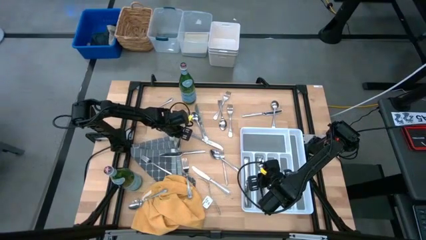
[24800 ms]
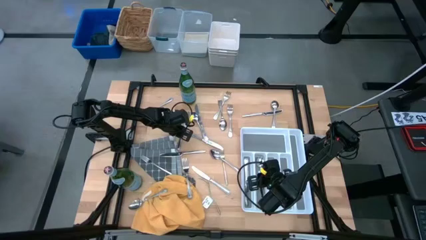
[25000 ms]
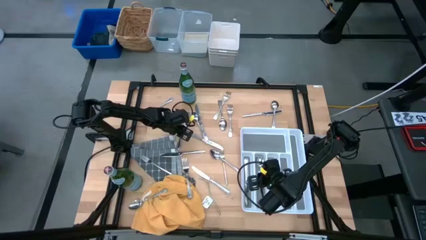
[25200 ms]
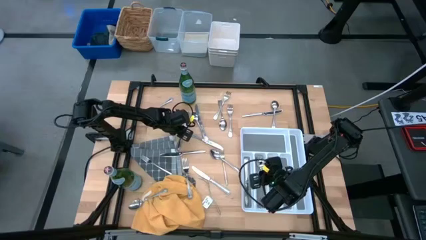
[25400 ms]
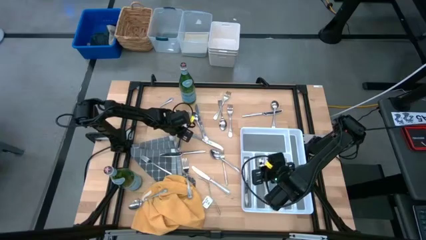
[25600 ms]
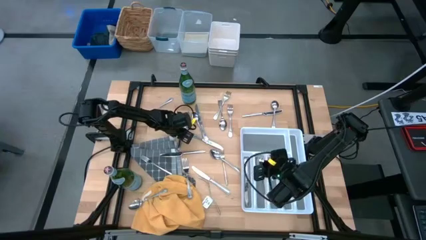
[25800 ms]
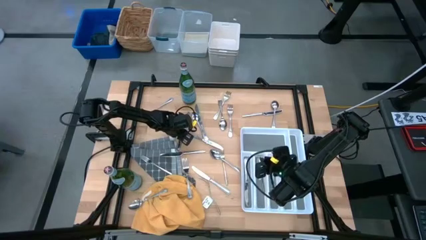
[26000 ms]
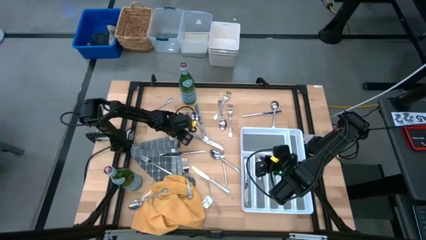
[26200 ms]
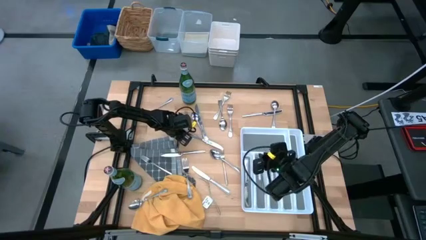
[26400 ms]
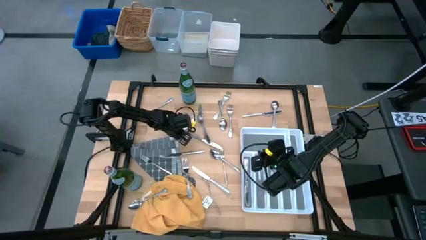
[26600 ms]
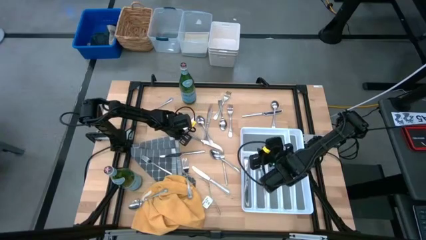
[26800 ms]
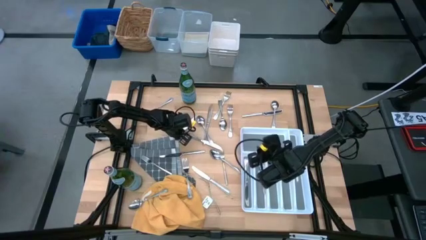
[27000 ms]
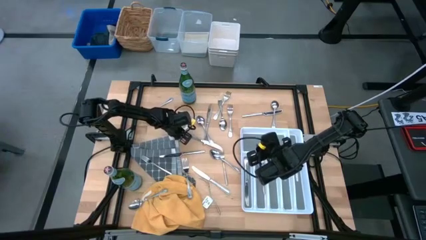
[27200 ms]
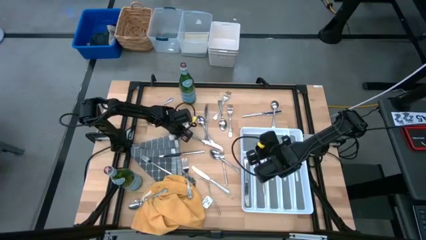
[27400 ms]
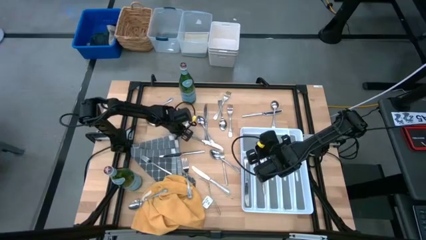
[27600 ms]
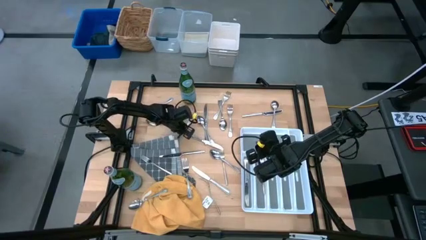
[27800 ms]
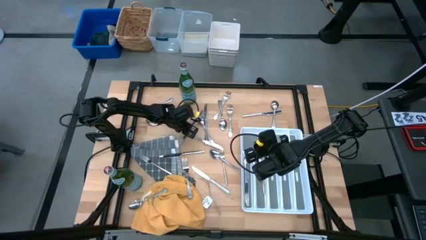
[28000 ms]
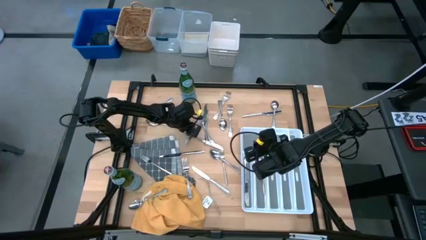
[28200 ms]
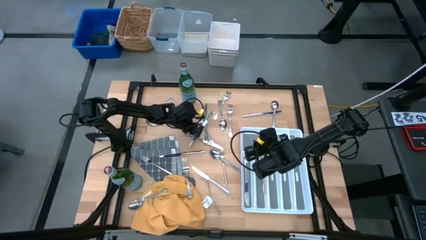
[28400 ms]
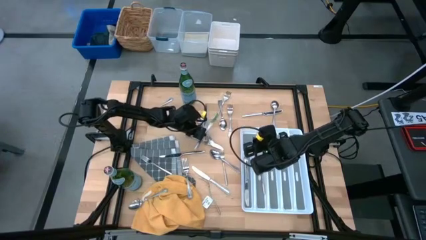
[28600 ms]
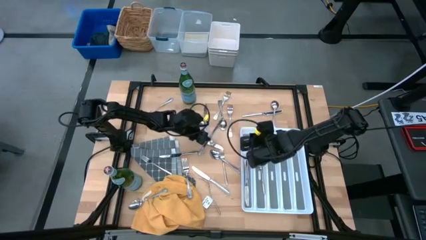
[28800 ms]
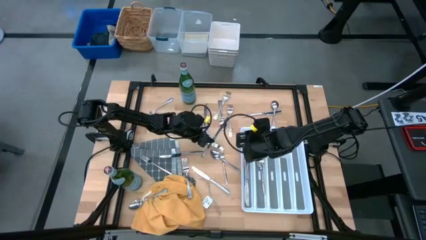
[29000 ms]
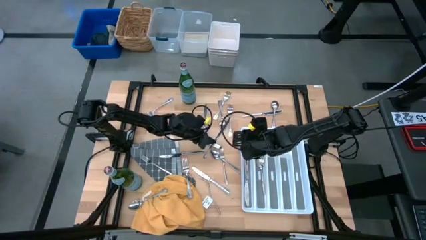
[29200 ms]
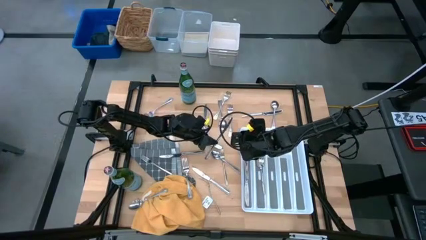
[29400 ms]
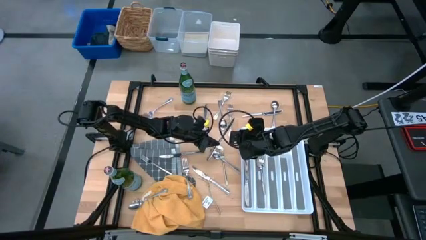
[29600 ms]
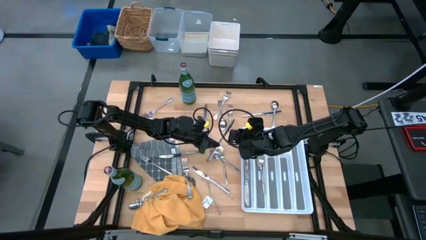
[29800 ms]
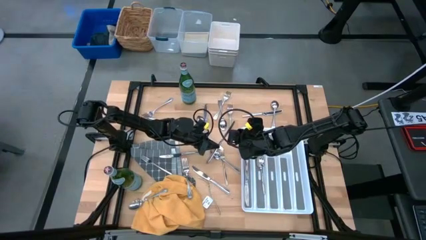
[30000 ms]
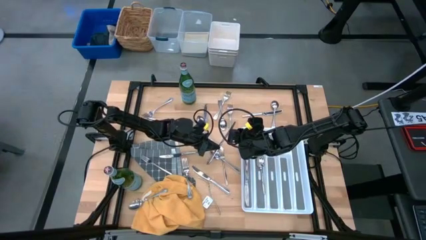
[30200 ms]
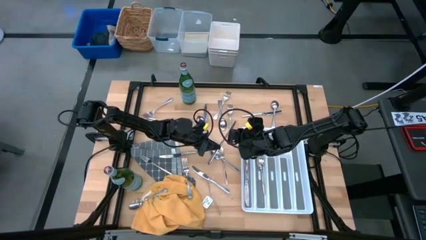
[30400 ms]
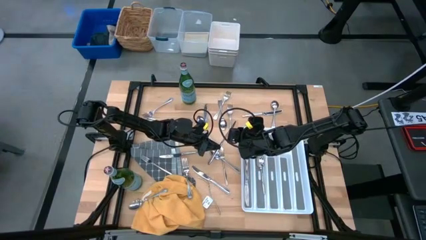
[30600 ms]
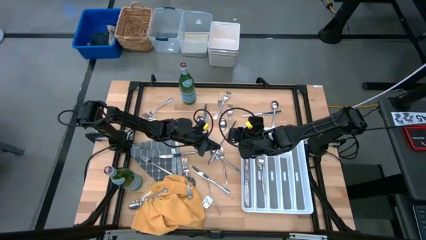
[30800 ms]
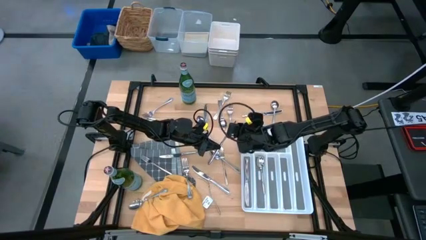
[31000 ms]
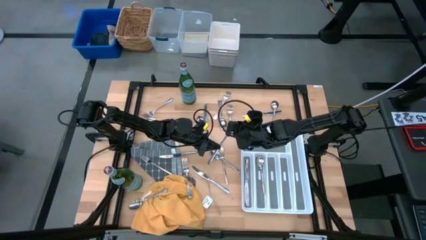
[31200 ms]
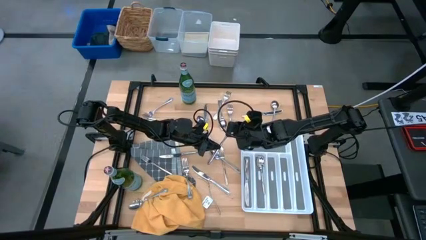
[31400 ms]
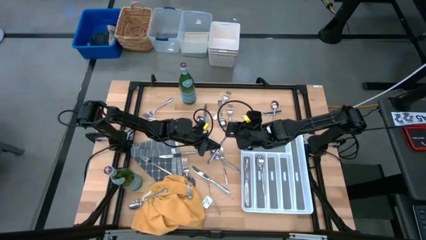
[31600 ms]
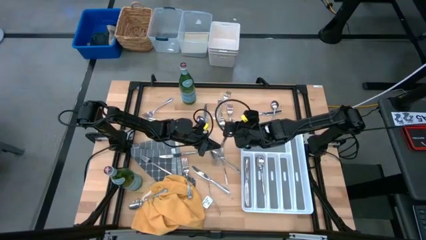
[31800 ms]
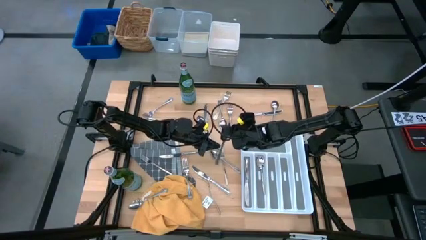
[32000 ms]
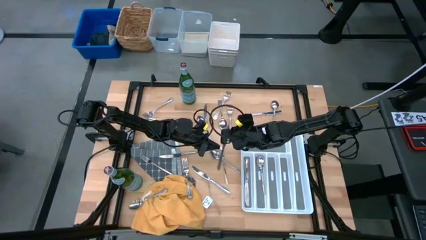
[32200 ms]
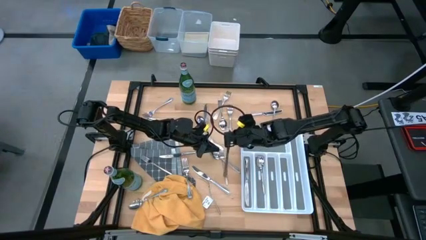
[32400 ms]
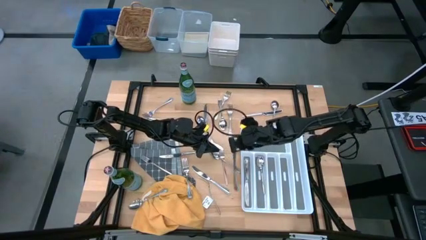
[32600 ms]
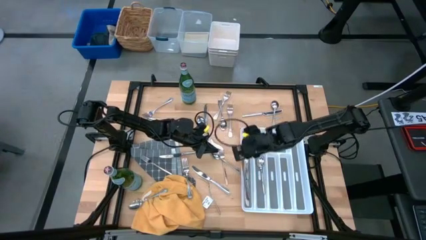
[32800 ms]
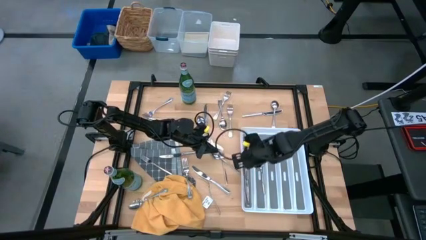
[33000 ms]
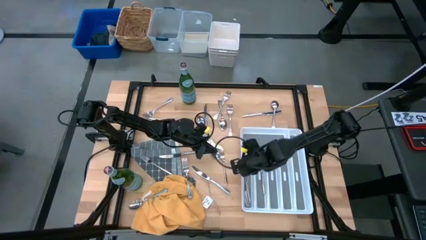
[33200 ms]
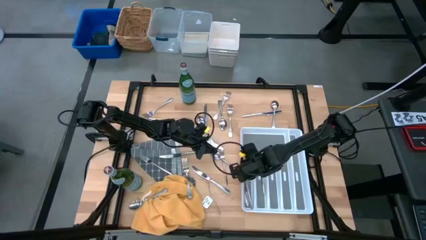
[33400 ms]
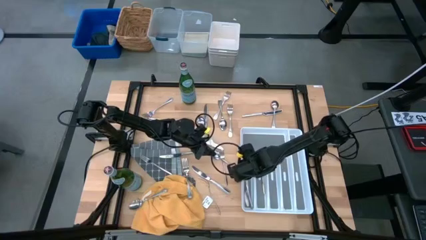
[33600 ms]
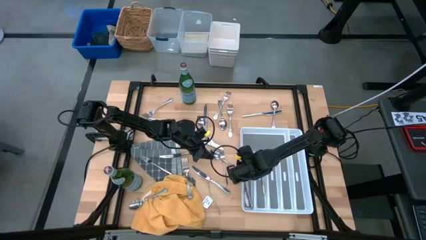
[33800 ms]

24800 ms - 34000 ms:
Stack the silver knife into the white utensil tray with the other silver knife
